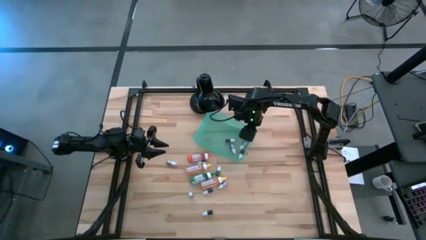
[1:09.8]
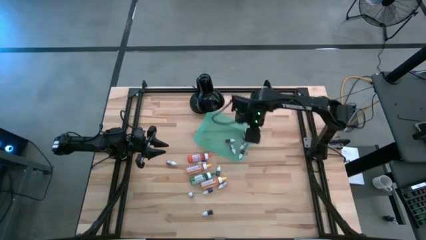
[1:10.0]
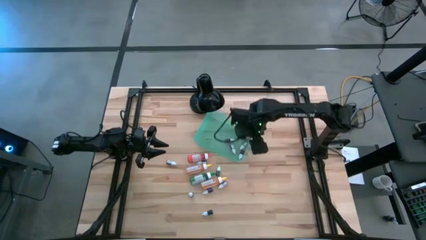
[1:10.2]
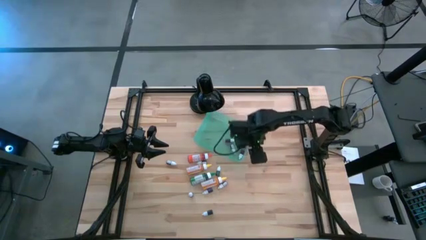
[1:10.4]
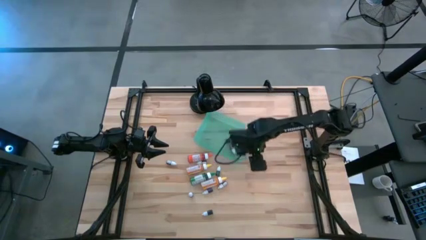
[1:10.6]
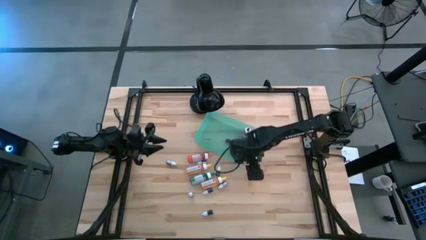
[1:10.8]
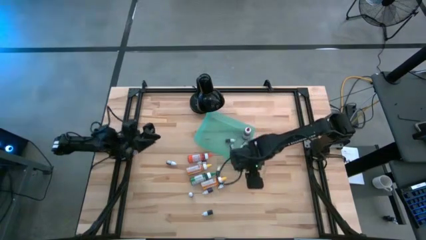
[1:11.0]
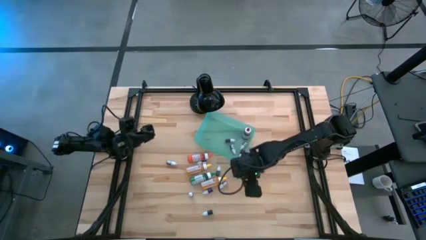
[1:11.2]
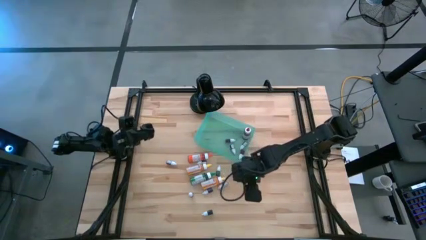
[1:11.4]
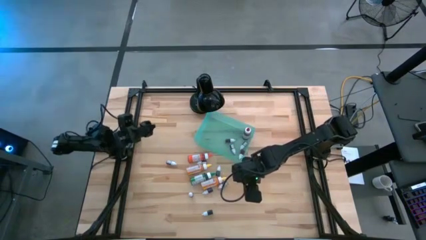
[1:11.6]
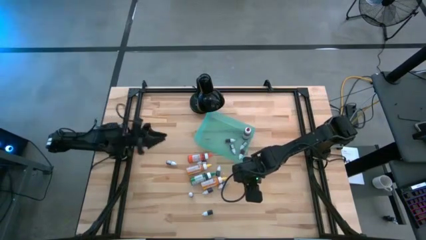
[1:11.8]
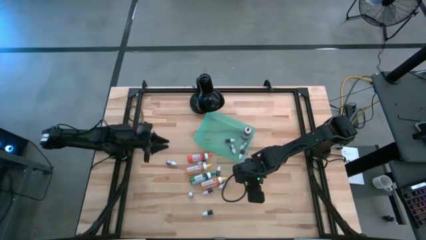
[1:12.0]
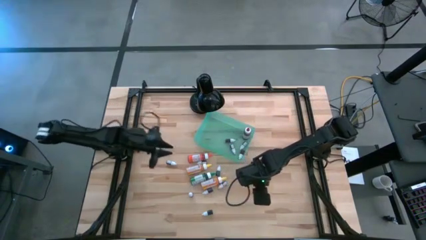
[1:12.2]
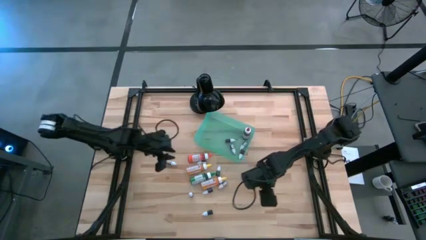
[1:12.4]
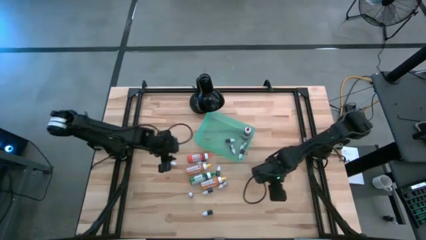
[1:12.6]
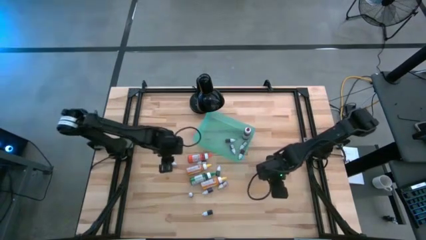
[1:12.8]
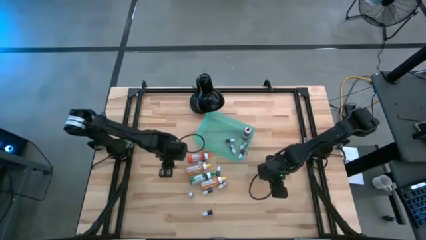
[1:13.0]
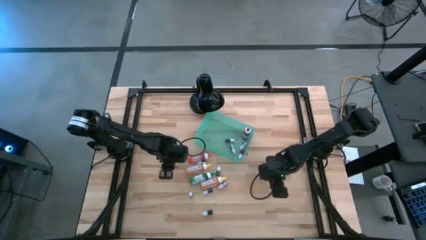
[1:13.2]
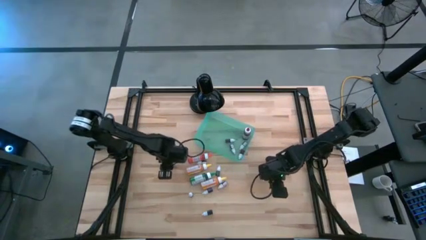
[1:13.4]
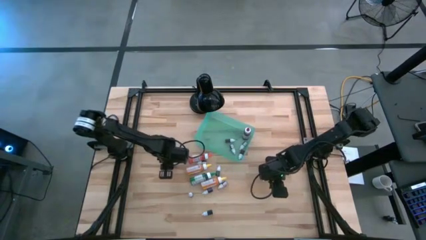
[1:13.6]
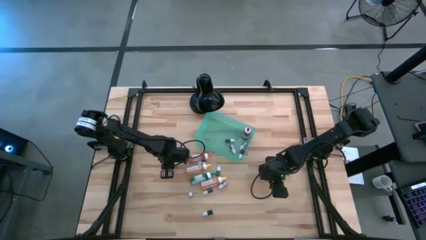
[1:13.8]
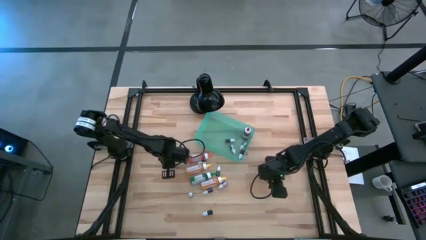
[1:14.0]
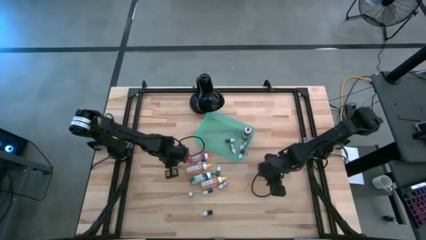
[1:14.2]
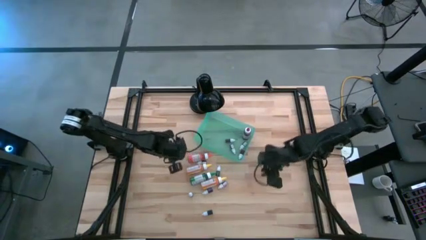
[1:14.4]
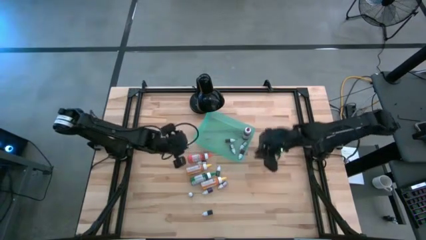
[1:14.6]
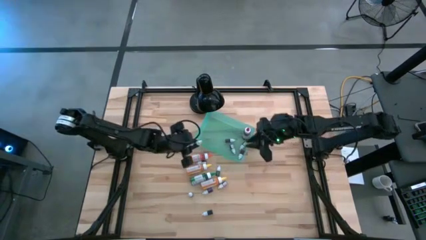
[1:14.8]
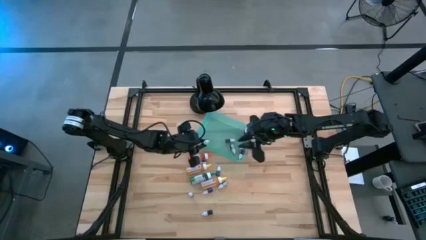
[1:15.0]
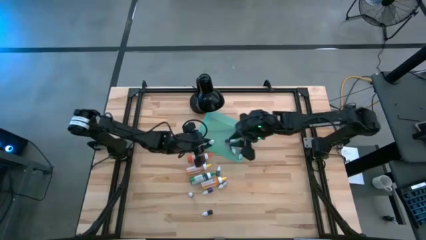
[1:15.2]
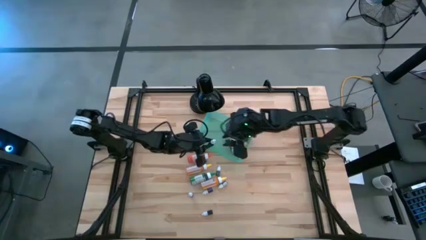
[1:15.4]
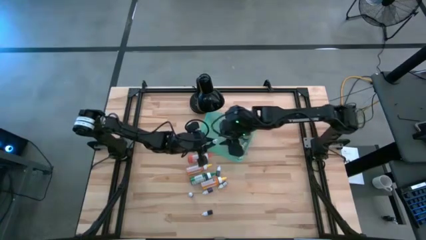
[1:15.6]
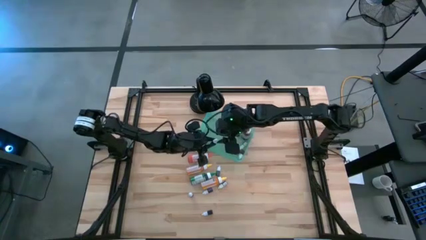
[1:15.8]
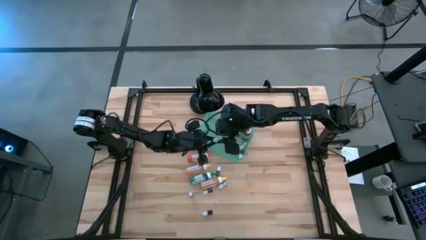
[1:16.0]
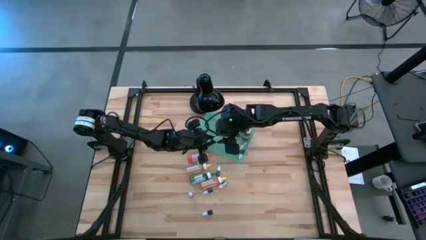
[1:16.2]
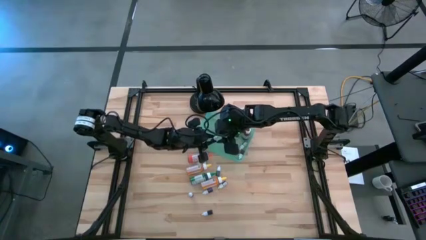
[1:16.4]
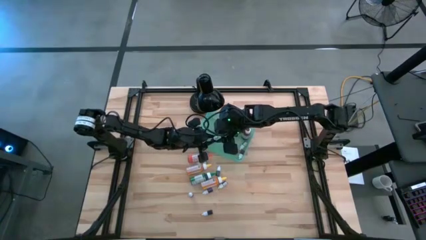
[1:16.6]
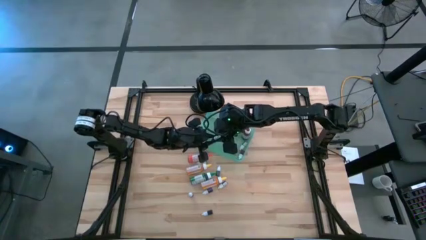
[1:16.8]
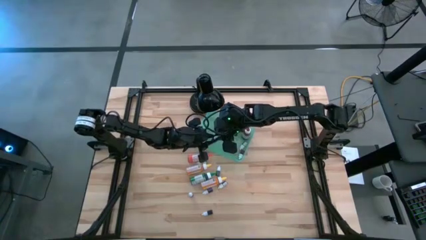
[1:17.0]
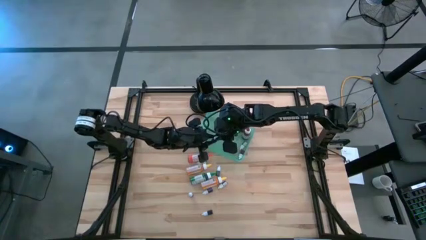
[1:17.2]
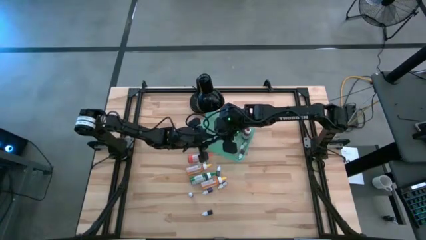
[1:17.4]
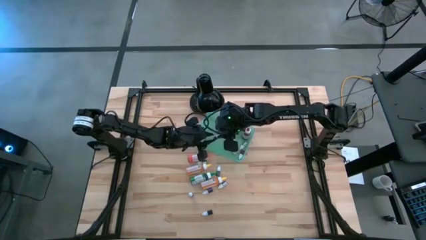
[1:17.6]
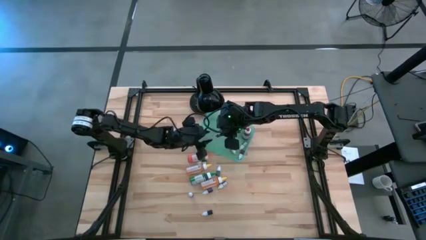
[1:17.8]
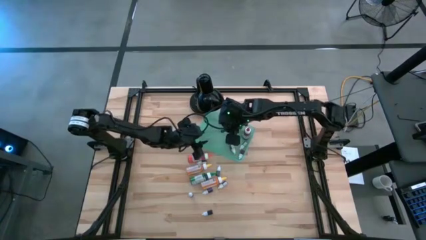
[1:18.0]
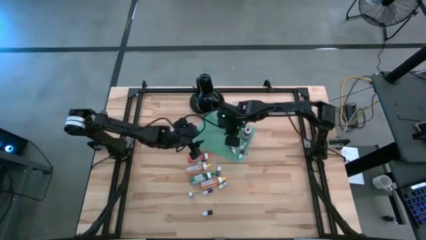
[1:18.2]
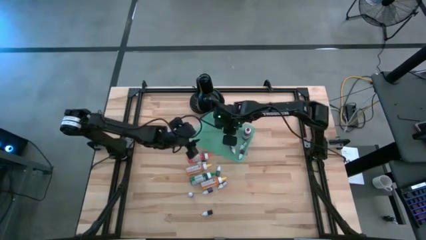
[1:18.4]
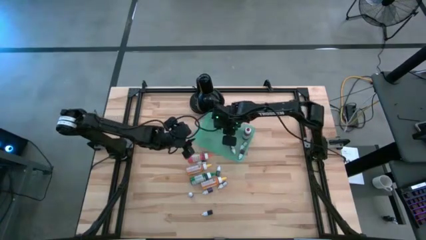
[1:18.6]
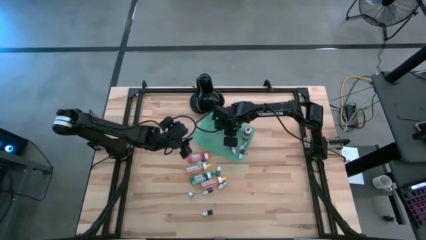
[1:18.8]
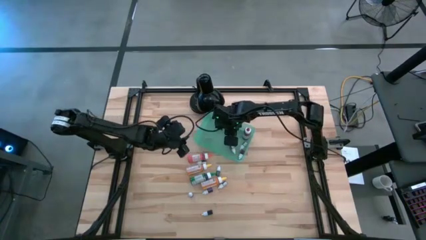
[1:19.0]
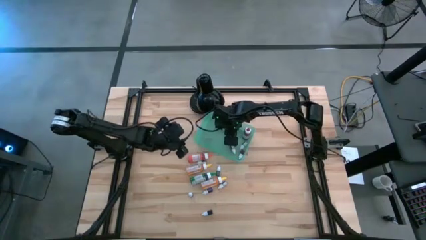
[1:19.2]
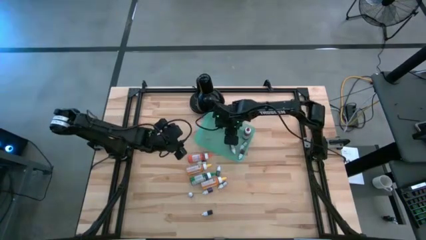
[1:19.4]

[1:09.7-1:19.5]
Task: Pick & Place food coloring
Put the small black food coloring bottle into the green bin

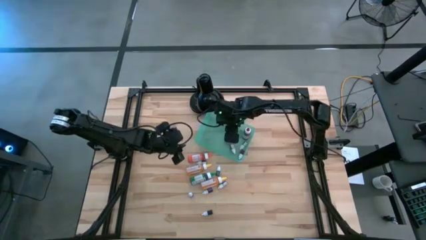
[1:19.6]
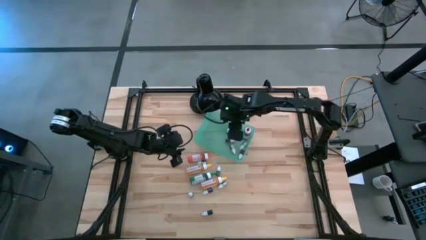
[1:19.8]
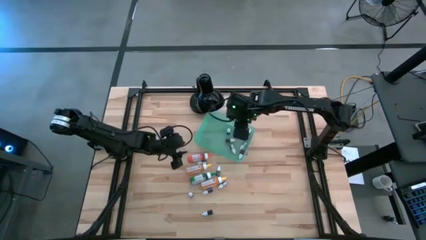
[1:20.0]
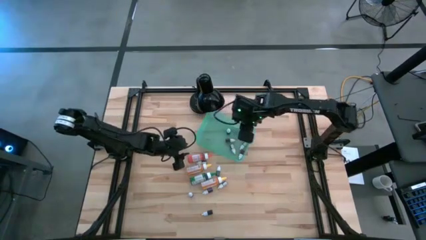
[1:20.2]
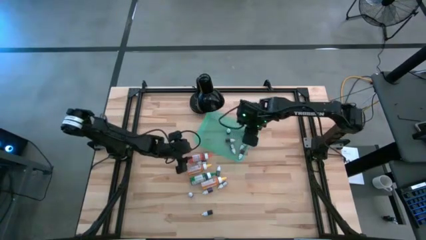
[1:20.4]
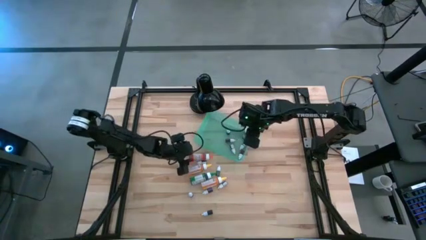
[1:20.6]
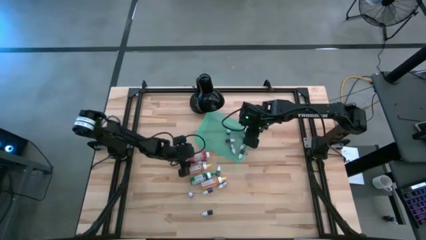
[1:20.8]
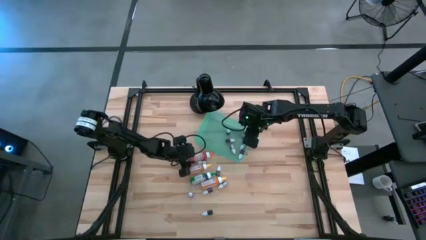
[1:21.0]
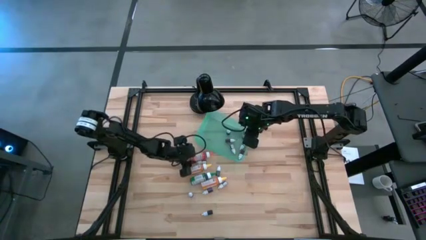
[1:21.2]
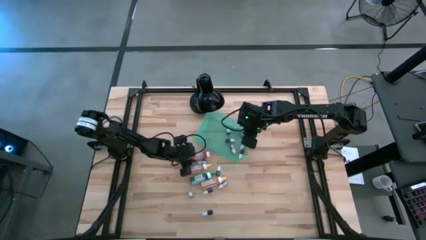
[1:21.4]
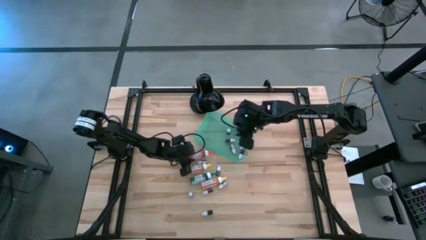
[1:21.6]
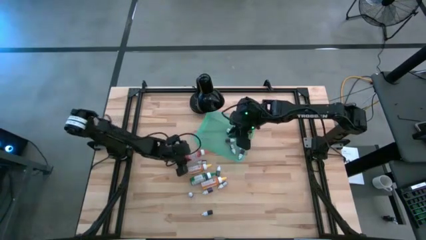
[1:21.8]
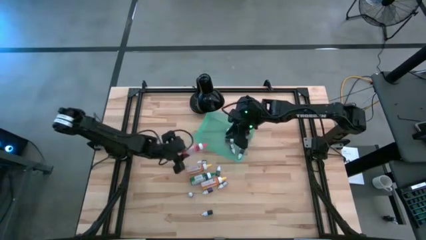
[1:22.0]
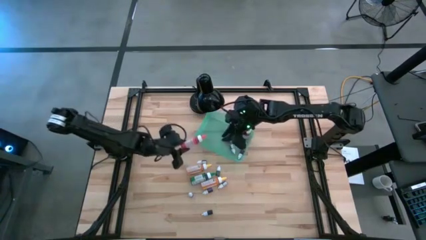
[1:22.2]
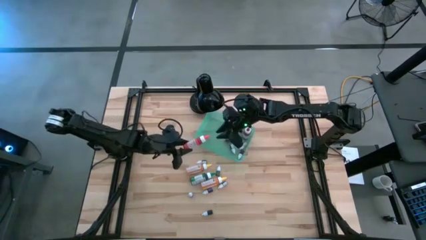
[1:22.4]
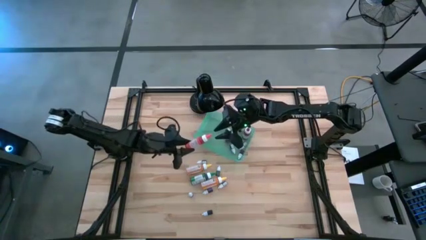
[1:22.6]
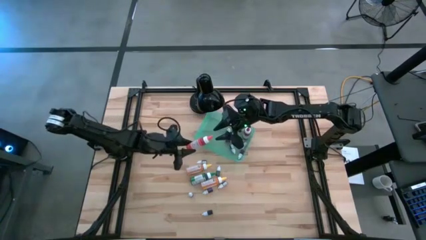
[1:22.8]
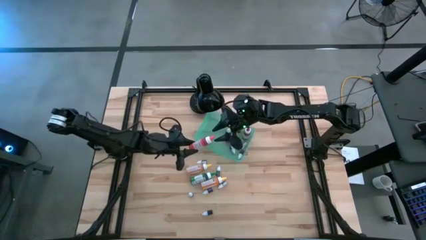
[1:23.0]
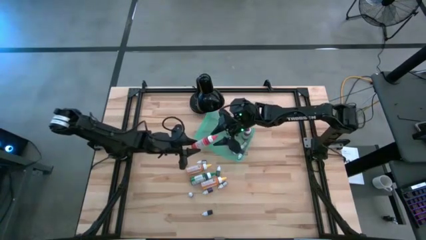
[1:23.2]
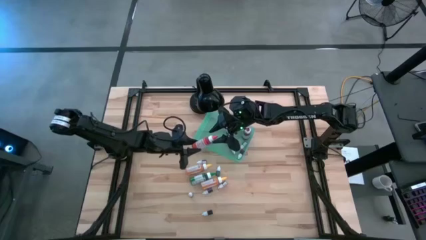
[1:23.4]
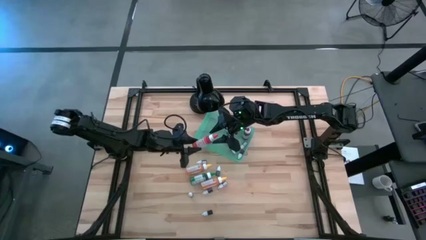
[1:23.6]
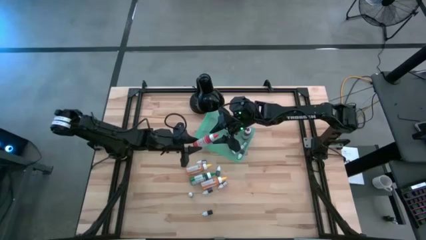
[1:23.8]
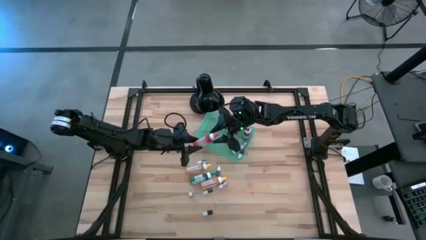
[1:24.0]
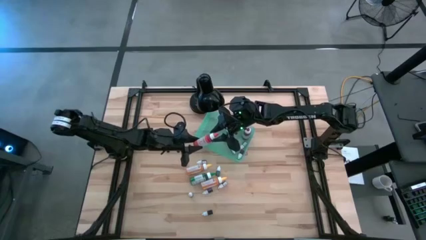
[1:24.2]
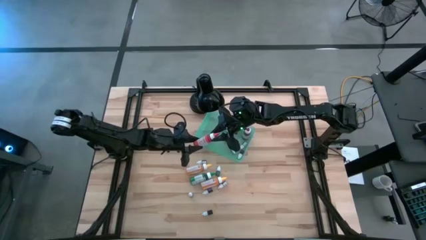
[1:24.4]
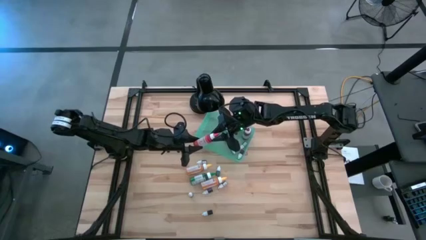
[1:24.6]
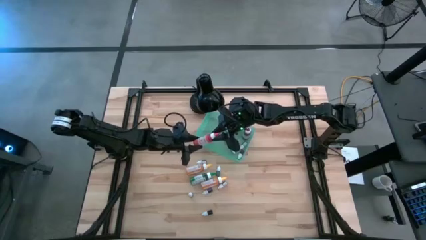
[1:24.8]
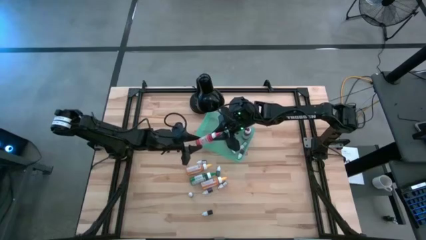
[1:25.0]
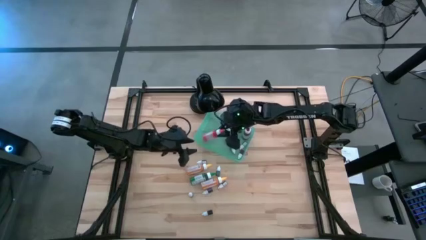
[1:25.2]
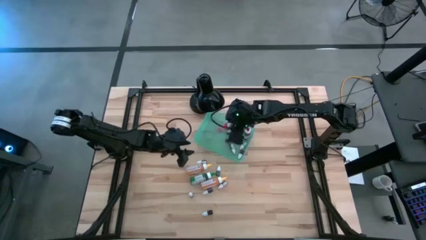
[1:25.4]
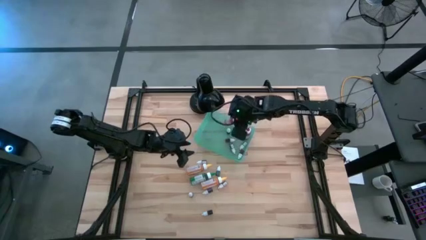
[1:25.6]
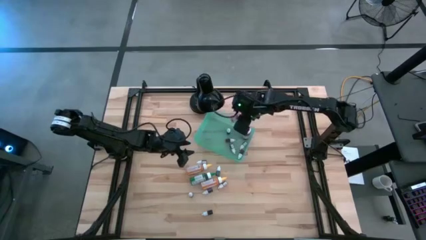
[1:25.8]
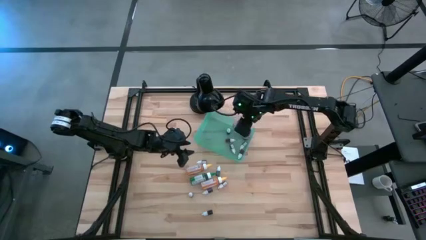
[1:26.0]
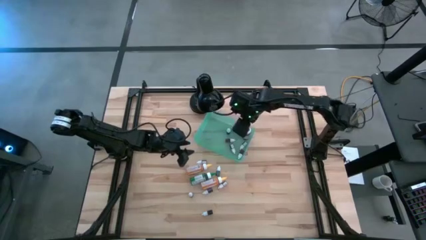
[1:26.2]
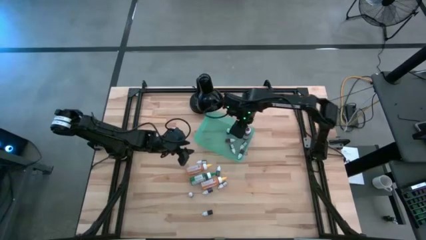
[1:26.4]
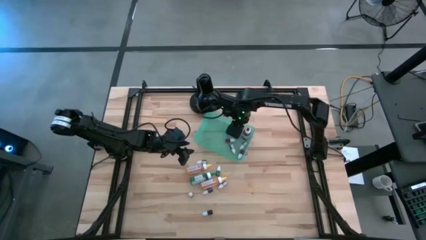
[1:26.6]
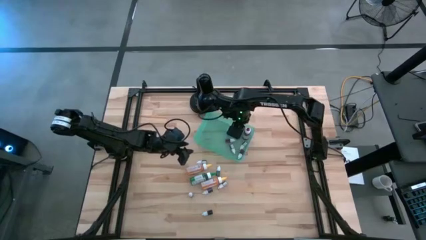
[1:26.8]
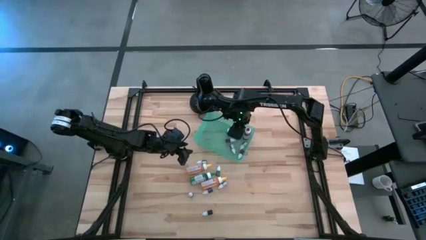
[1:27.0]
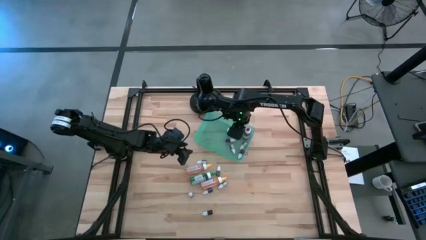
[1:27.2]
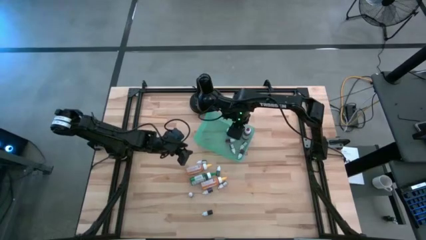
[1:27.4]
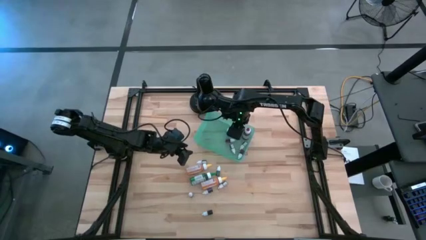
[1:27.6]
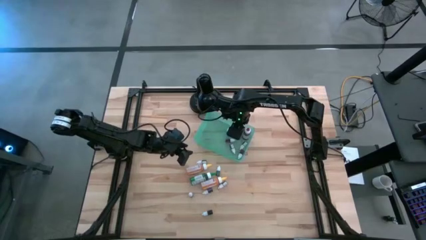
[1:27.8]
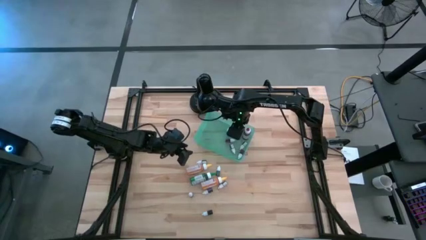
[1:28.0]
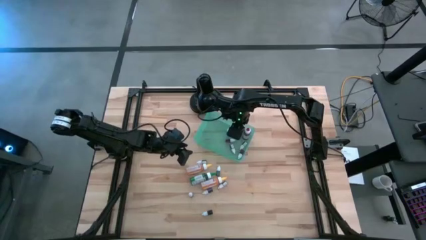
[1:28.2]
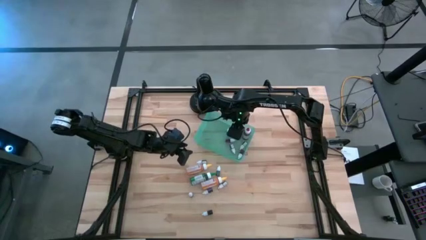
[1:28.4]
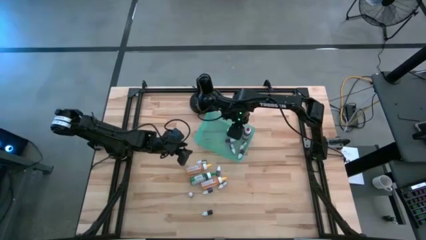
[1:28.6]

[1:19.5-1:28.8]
Put the large orange food coloring bottle into the green bin
